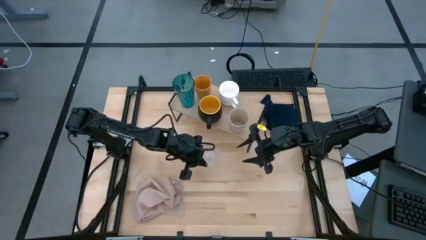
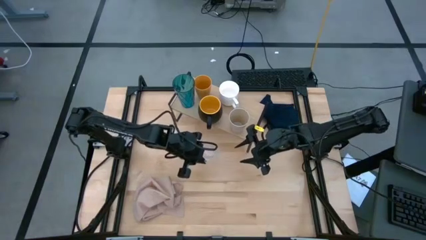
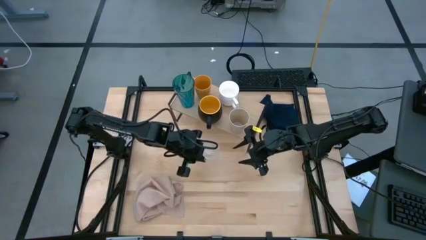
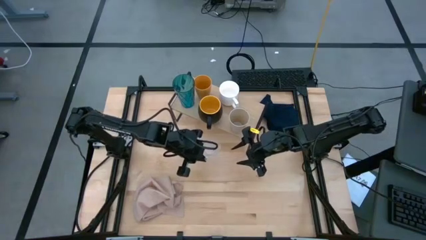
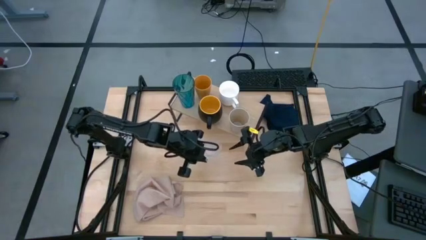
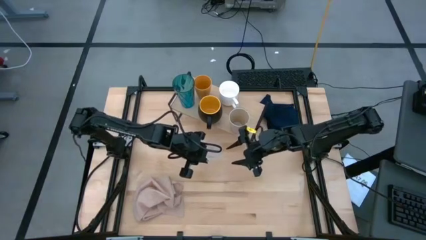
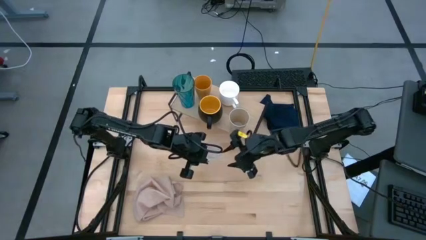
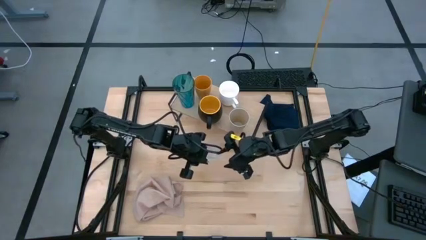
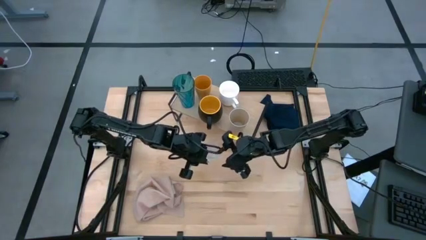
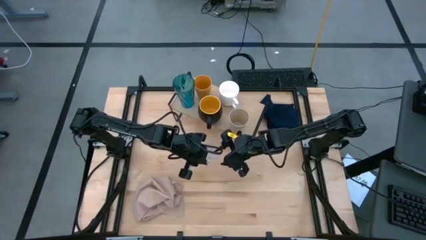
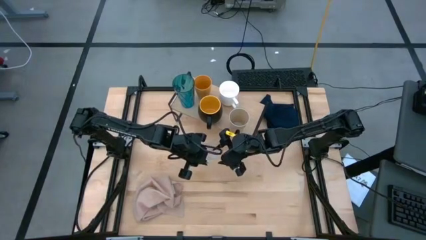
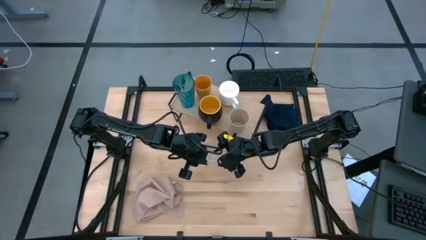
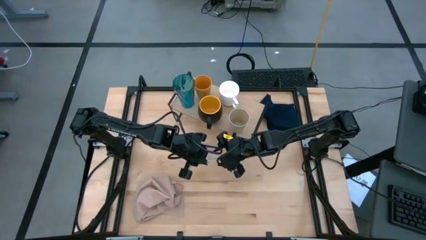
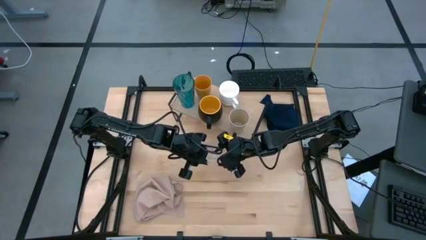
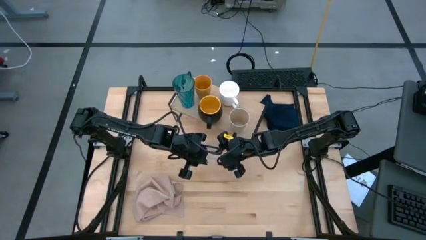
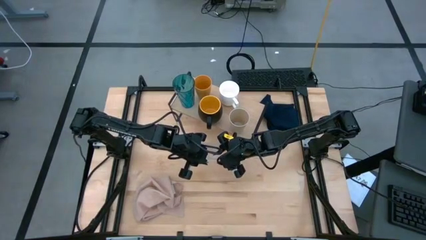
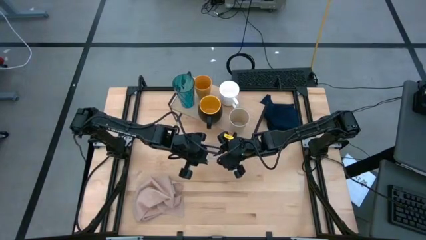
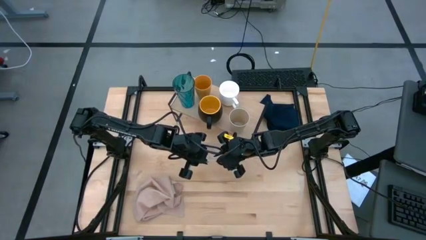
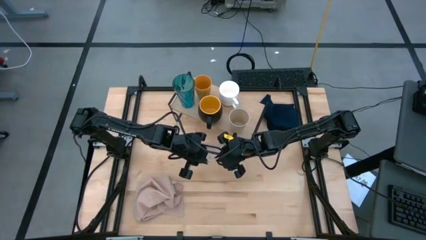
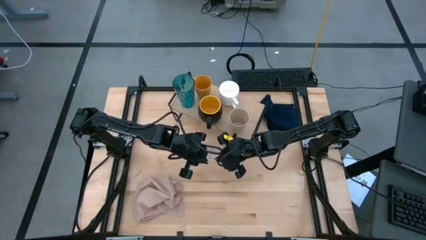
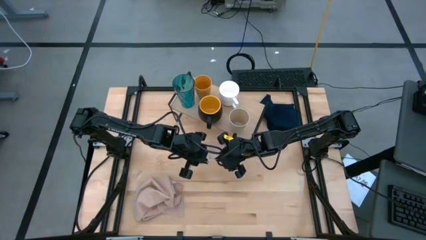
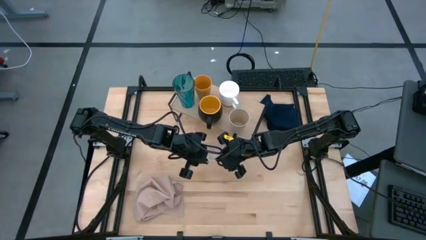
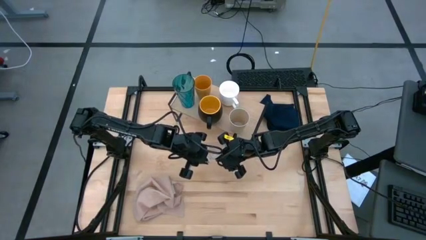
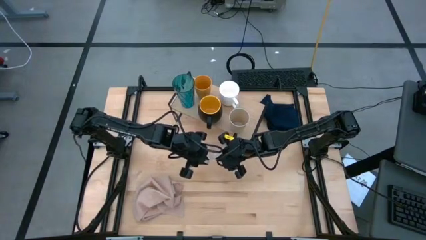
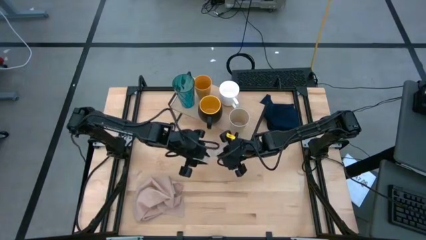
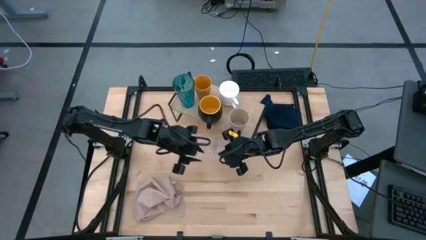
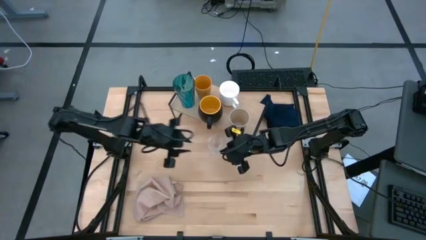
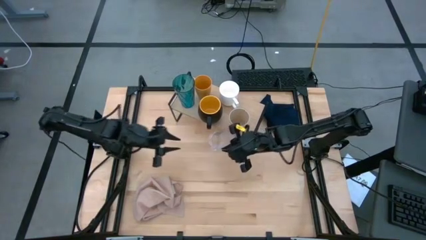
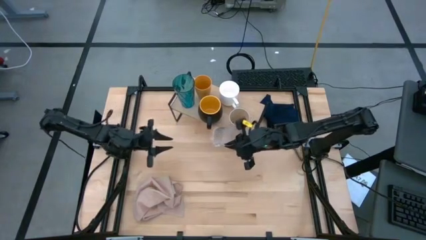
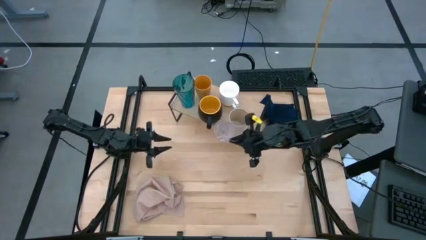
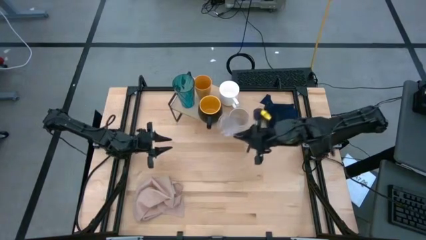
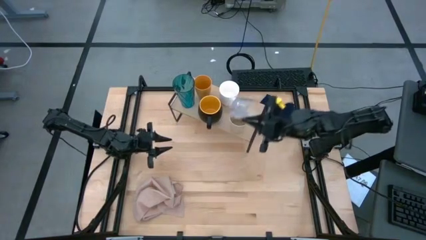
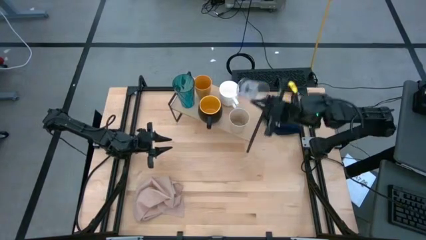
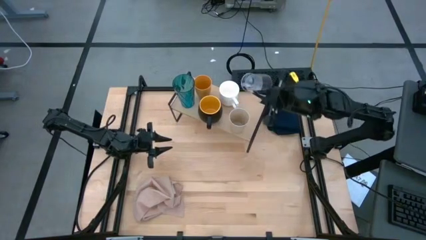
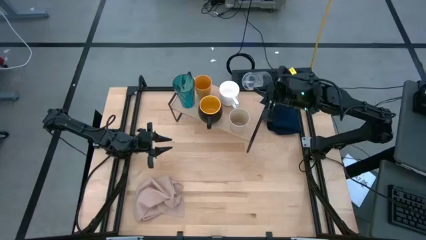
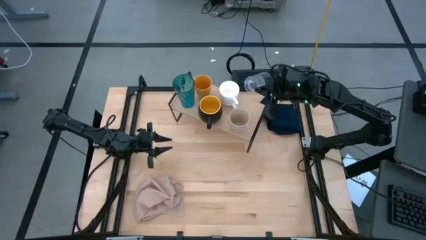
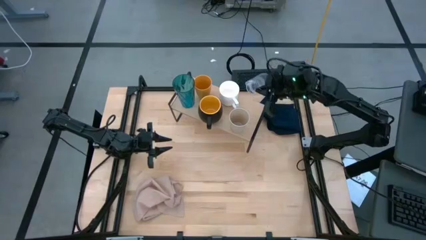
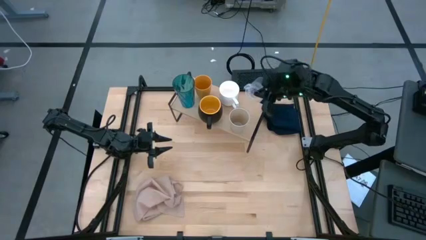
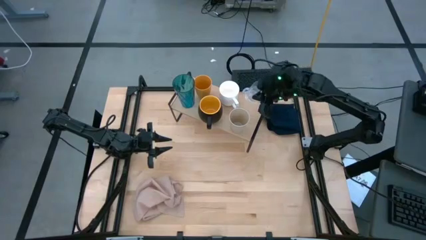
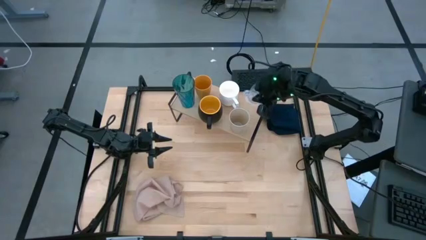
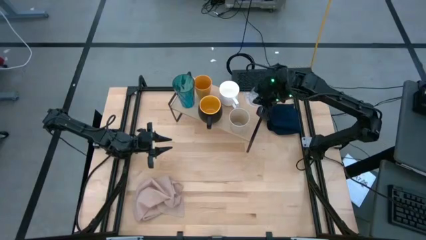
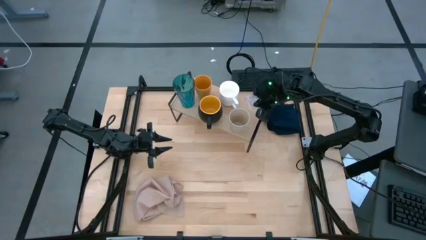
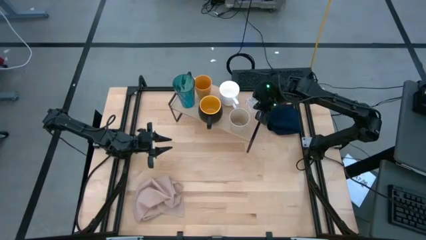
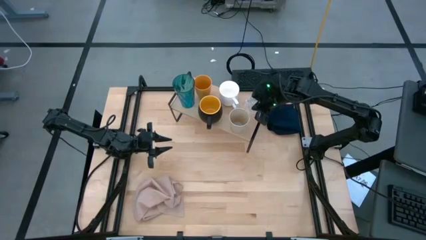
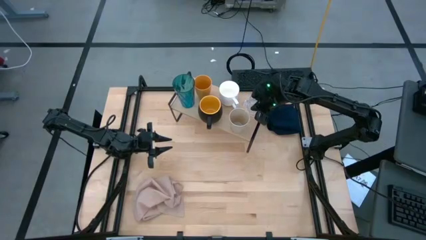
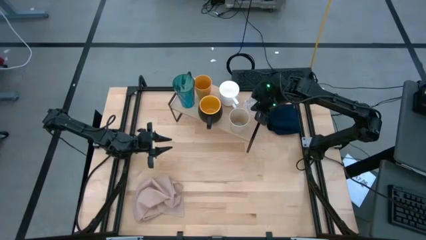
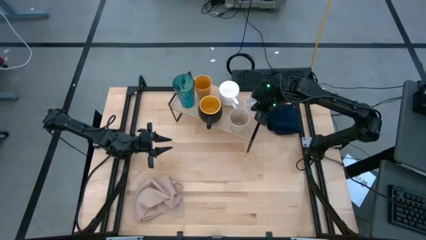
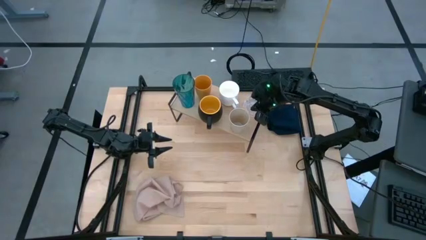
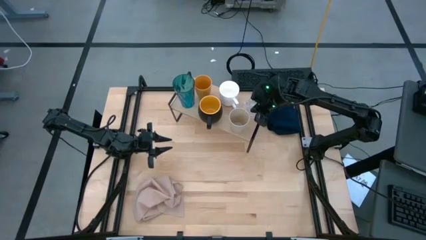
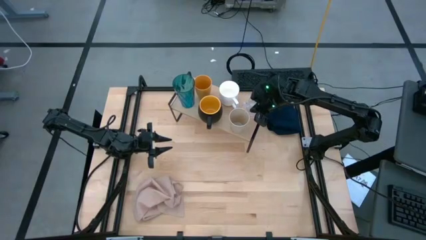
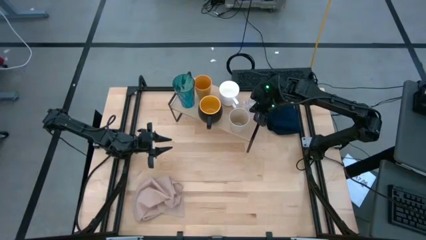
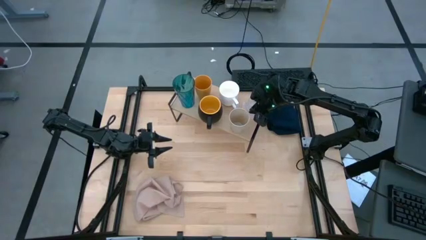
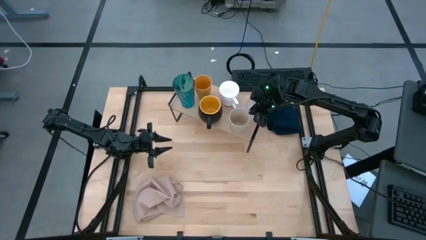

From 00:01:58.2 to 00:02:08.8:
Task: Stack small to large cups/mugs on shelf
Put the transparent cup on the shelf
